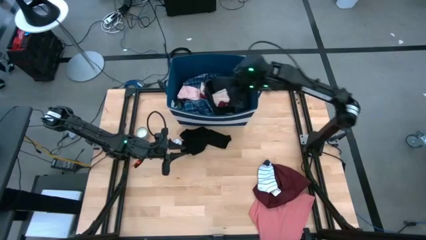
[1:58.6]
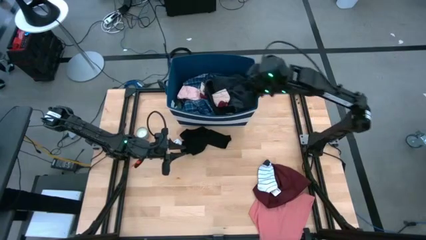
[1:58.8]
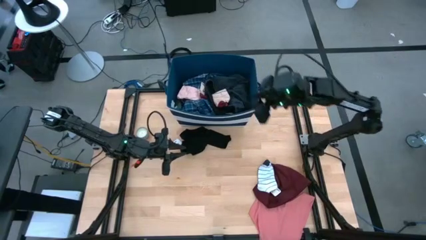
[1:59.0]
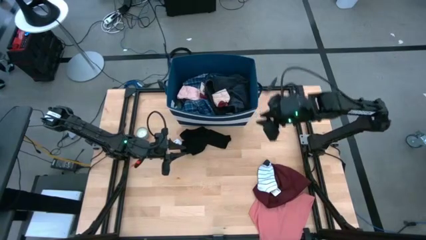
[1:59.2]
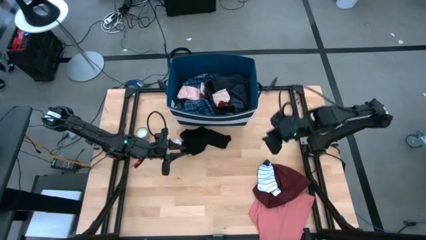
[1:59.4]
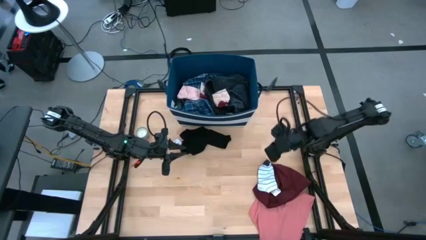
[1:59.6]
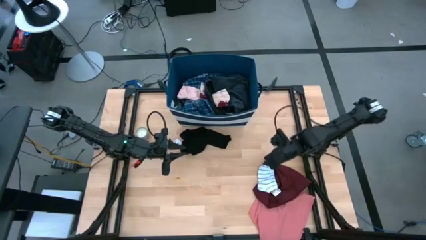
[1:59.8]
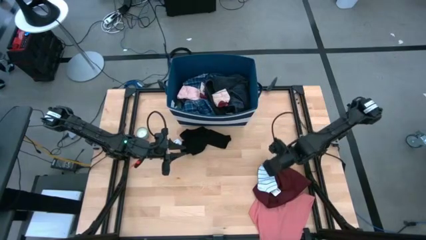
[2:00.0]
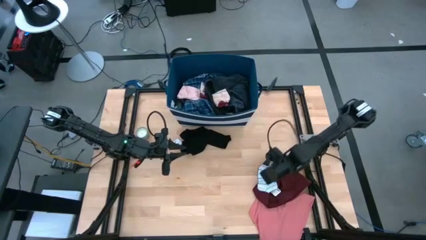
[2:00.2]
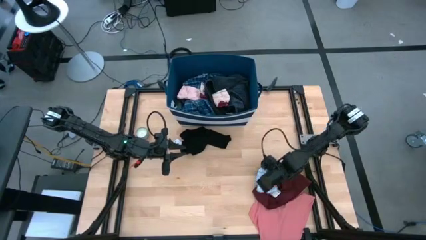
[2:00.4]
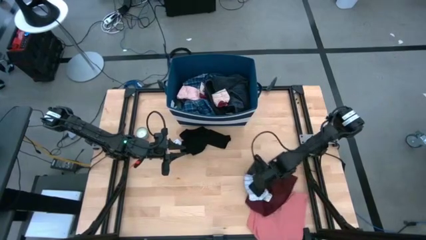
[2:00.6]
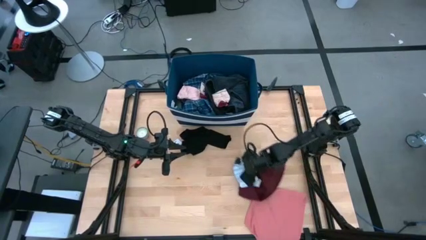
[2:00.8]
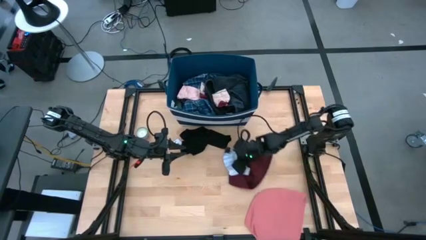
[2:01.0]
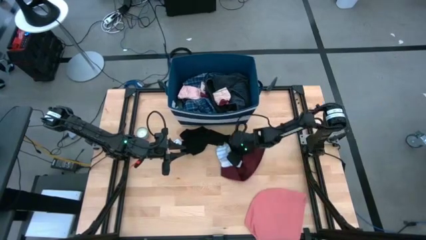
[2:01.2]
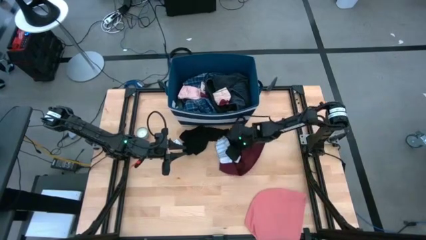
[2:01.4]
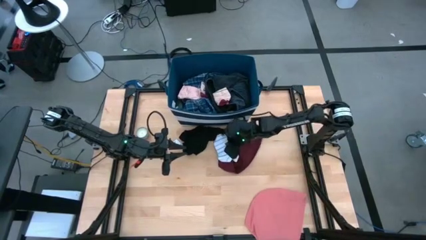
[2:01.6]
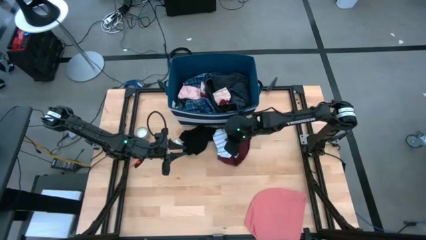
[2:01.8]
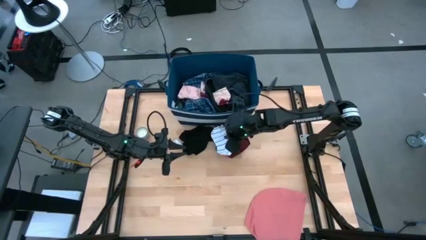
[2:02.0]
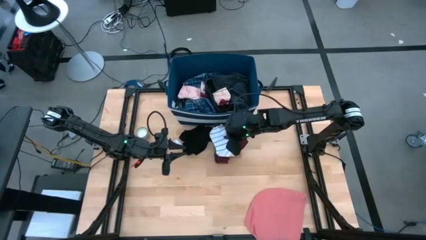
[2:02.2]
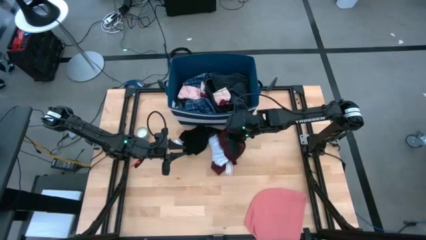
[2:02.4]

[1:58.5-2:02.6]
Task: Sort clothes
Move the white sock and red underwear to the center of the table

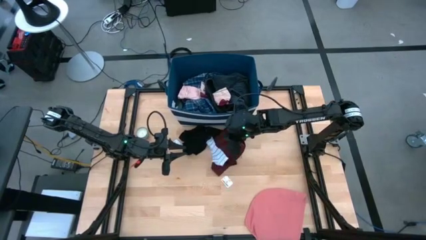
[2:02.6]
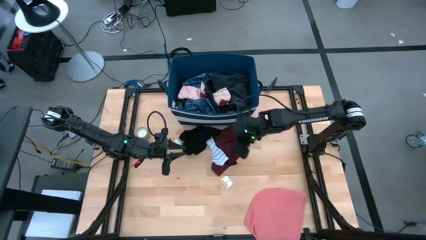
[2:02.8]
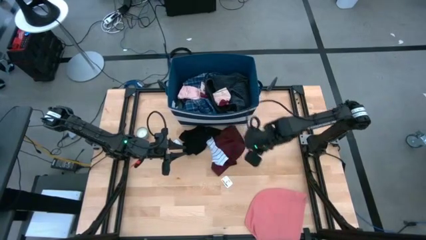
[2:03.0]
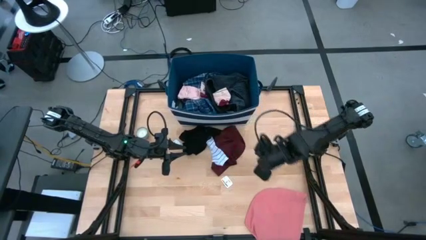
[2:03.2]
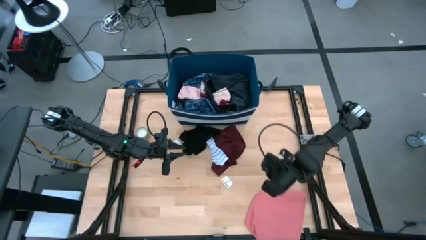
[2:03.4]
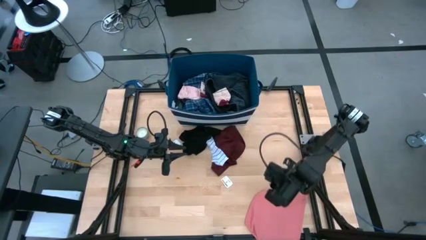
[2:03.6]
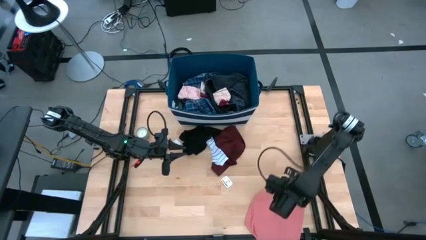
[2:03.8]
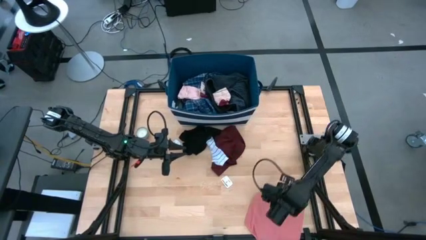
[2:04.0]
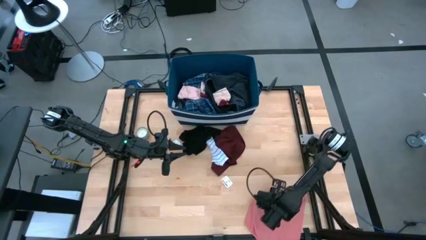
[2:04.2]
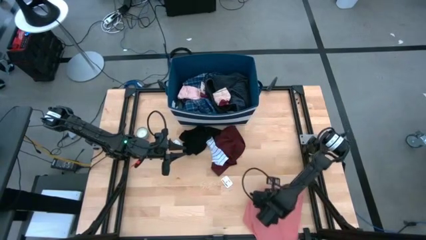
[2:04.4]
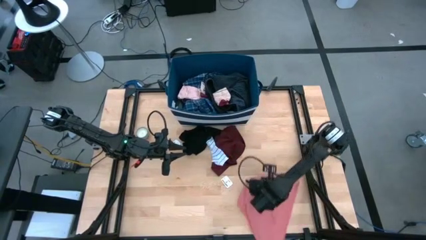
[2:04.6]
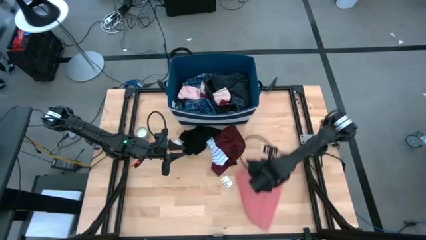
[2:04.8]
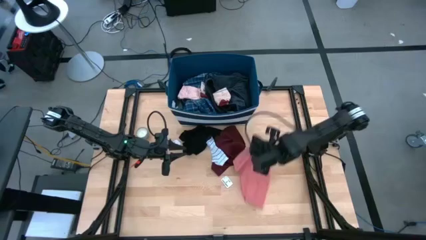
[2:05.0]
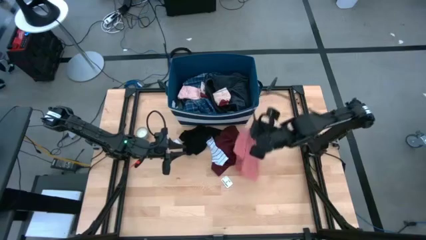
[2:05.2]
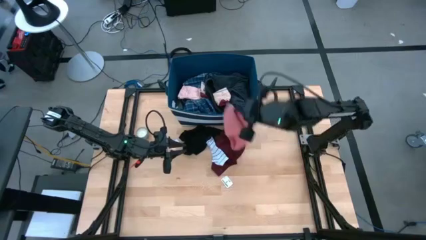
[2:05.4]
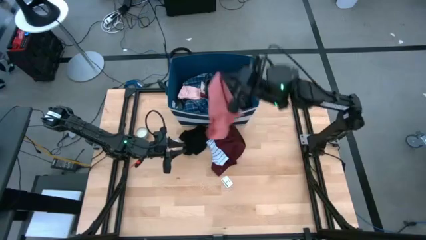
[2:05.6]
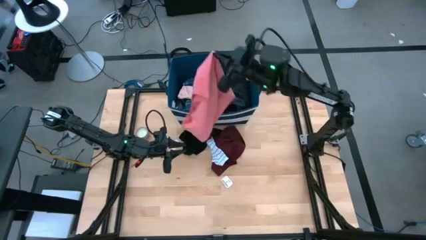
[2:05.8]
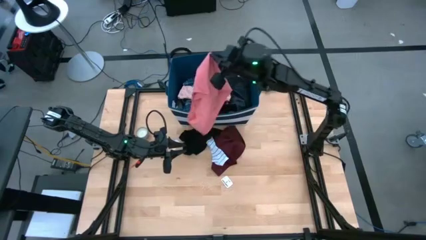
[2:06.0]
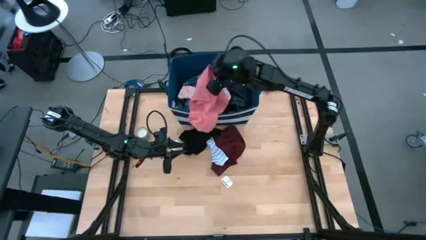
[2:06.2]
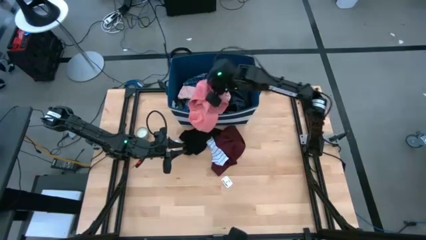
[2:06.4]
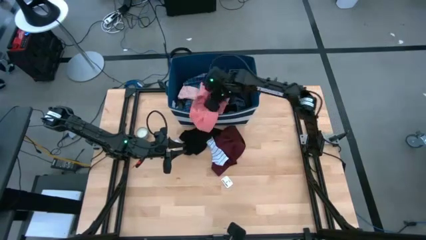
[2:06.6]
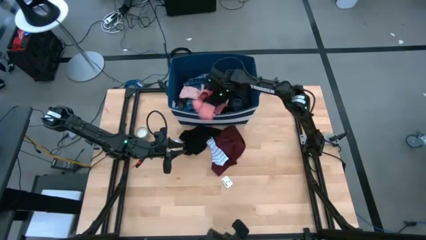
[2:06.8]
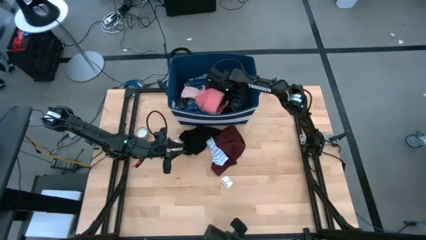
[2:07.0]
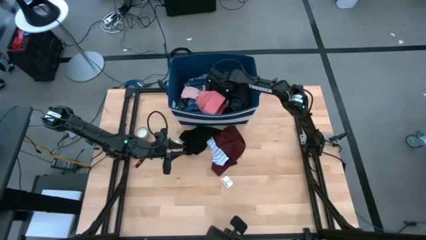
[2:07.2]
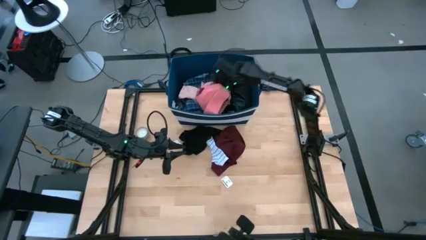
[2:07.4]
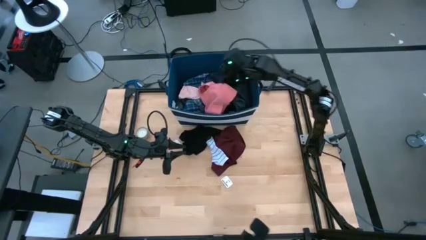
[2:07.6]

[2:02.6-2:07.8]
Put the pink underwear into the laundry organizer

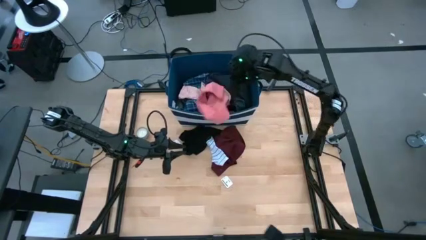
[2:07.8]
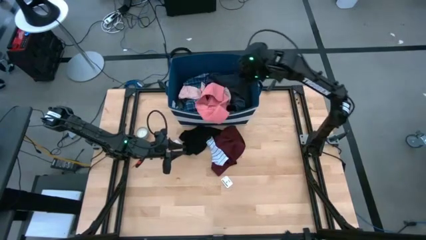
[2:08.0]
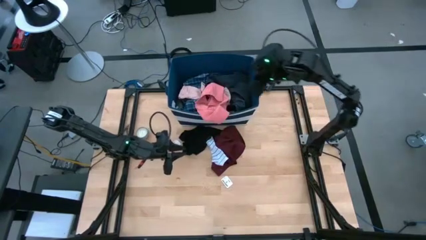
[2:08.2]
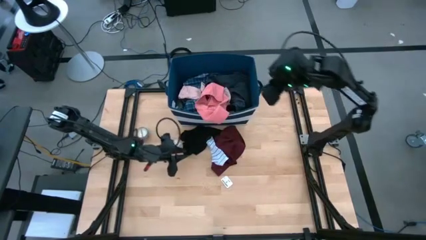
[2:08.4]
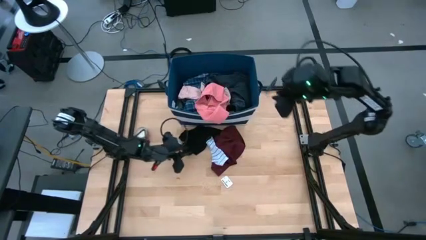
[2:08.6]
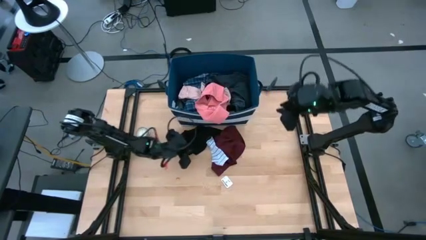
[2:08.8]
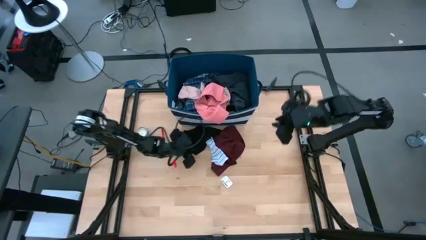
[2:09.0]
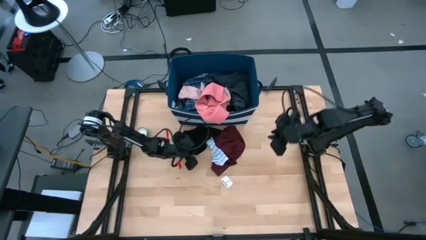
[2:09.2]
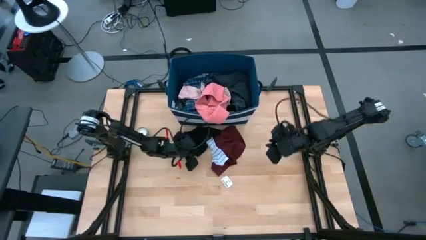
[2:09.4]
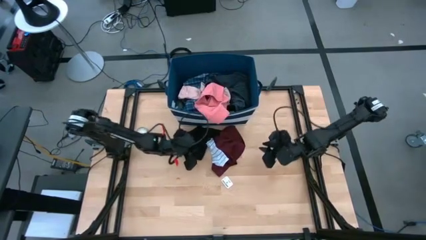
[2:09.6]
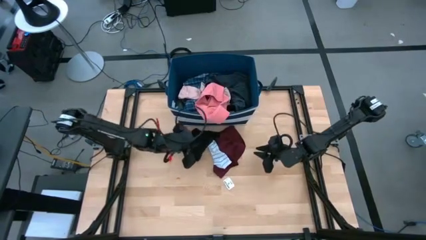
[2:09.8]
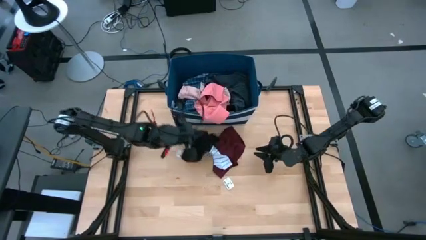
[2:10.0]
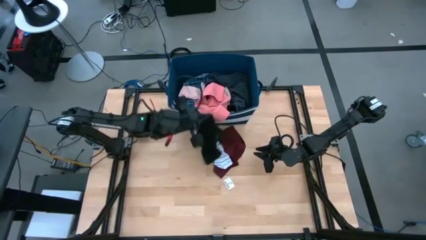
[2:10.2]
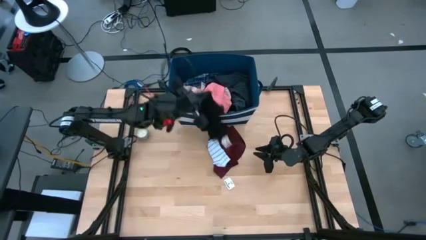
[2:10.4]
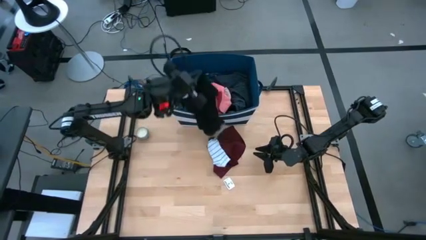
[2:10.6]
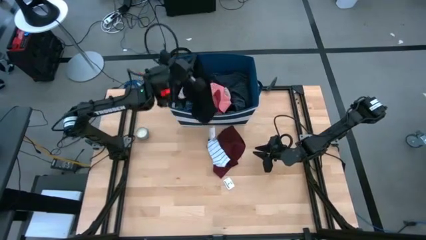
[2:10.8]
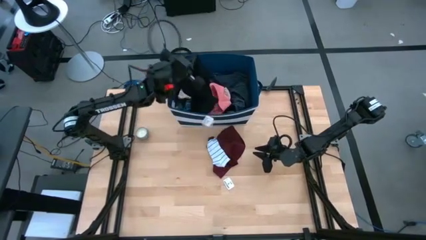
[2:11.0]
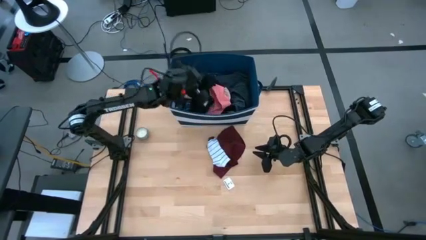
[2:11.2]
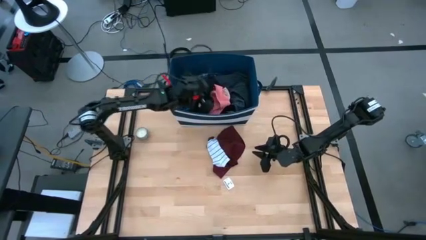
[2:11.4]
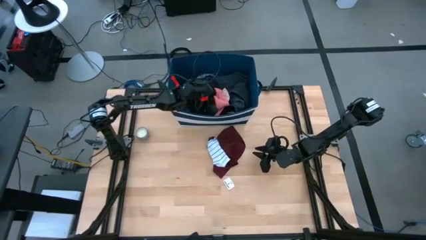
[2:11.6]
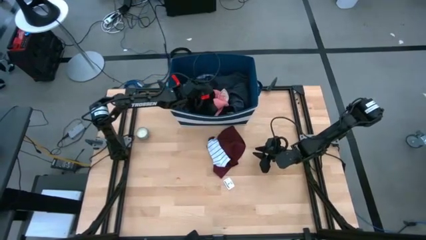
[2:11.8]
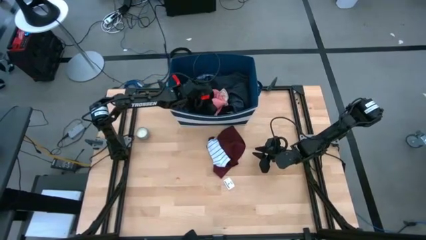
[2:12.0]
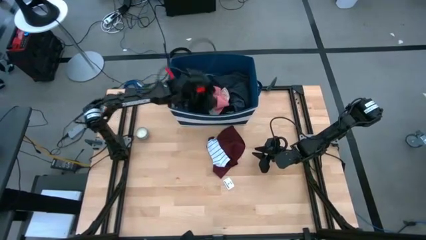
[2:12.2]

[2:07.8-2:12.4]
Put the black boxer into the laundry organizer

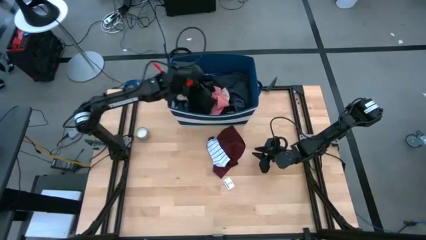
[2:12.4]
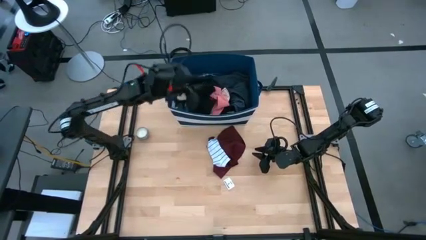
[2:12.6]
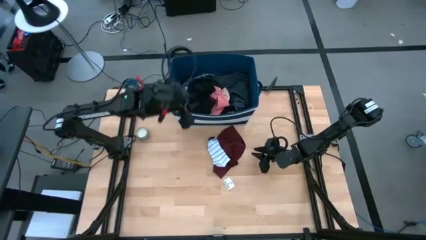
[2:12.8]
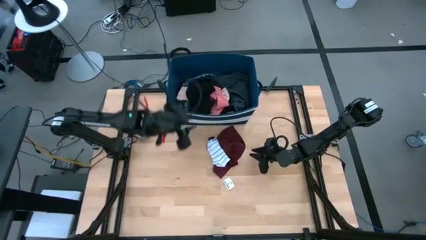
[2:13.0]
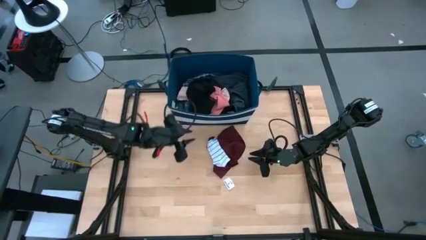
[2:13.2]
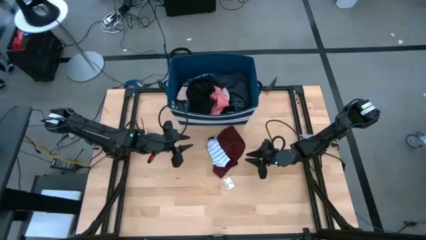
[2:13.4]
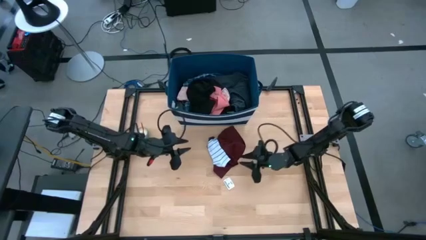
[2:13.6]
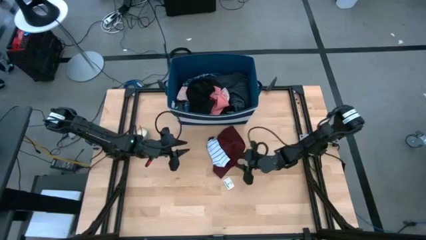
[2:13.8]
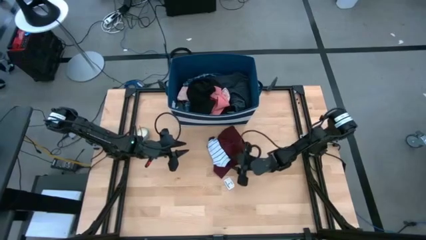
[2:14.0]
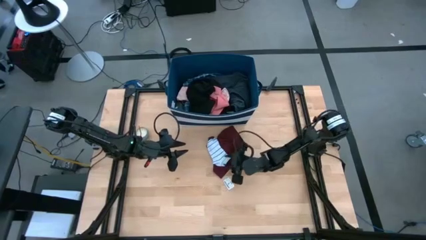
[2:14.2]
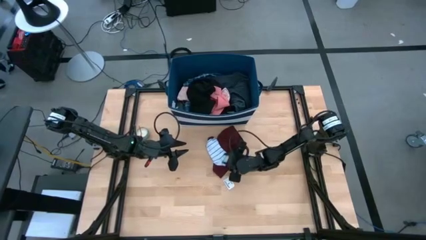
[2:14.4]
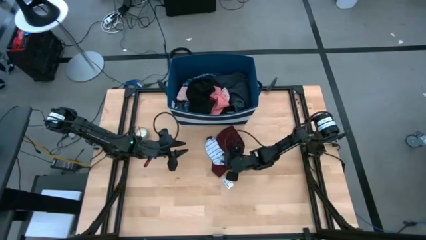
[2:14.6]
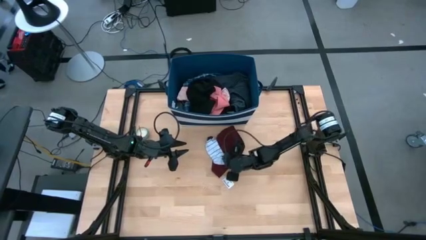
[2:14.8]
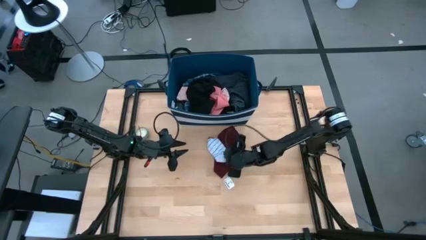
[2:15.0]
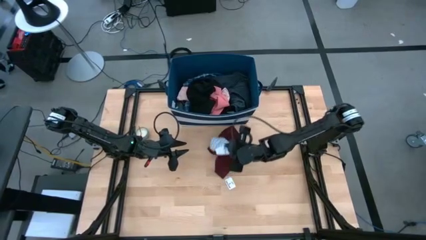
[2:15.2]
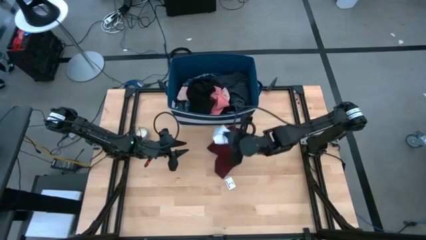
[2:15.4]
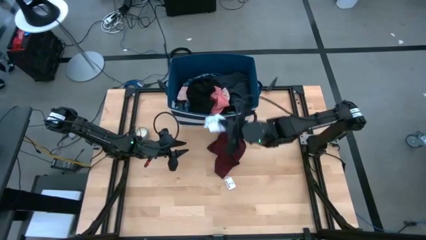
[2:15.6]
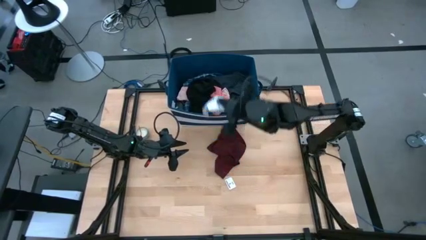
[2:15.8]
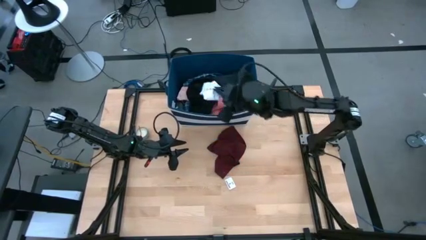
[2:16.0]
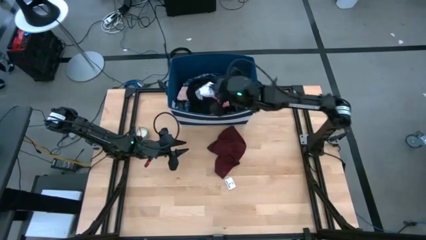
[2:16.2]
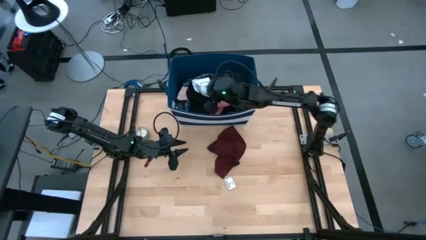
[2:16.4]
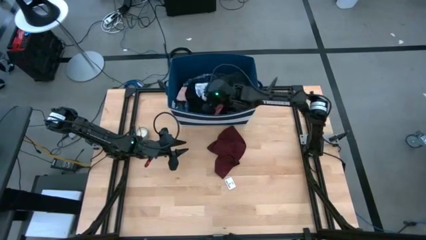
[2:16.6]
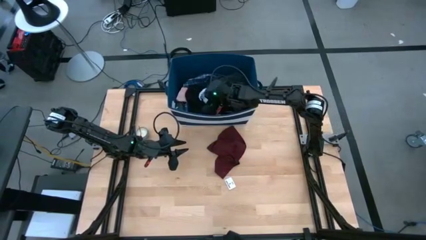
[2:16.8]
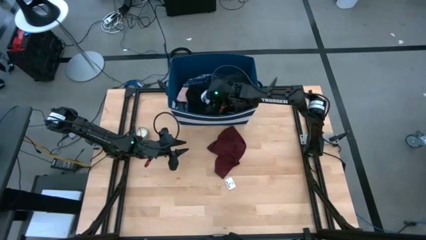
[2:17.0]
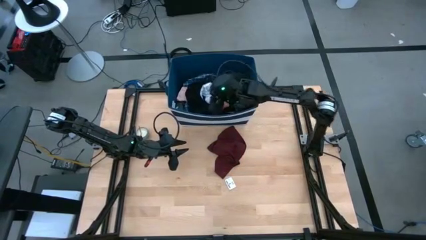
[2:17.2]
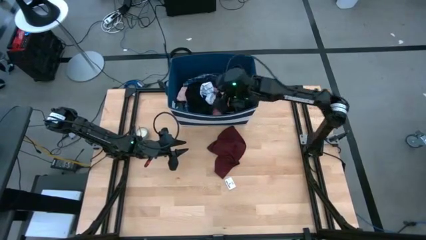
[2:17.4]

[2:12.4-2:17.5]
Put the white sock into the laundry organizer
